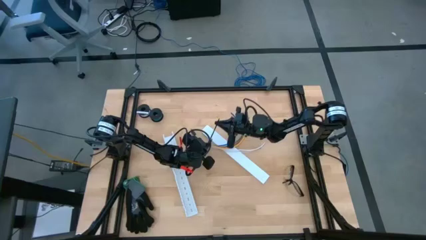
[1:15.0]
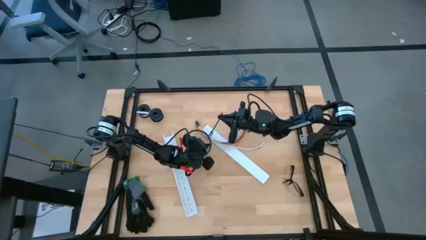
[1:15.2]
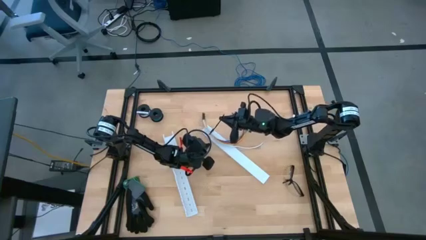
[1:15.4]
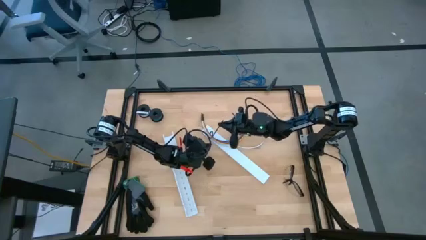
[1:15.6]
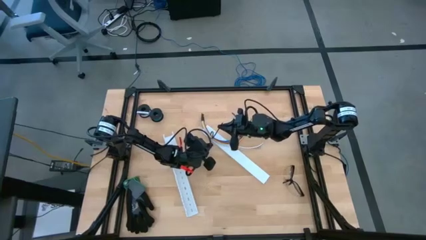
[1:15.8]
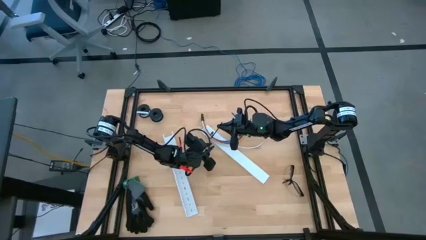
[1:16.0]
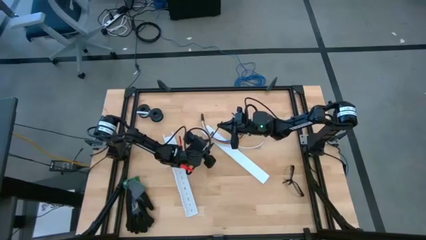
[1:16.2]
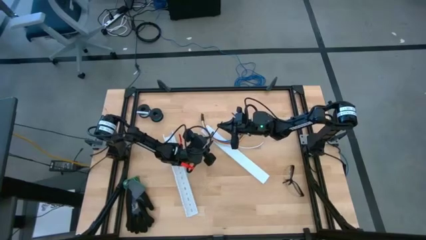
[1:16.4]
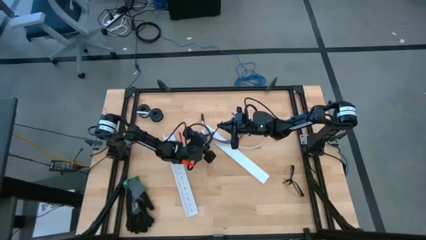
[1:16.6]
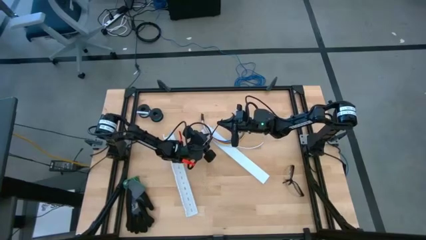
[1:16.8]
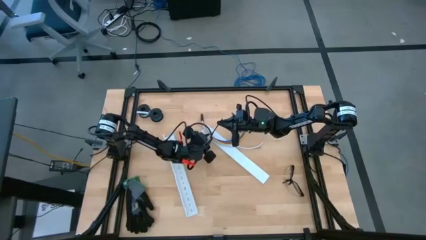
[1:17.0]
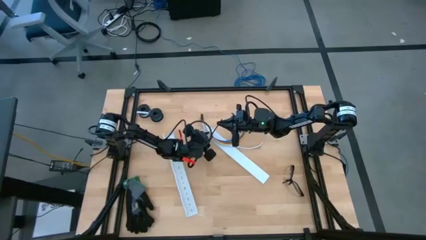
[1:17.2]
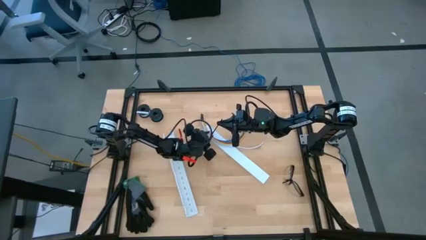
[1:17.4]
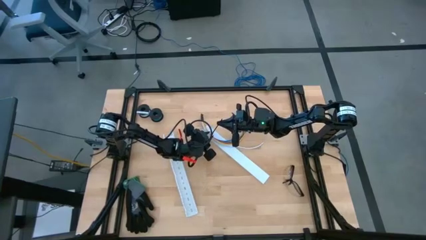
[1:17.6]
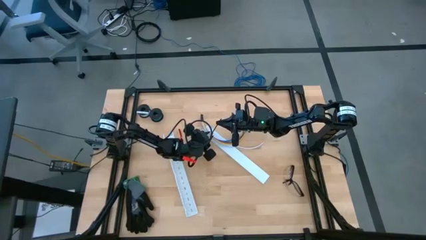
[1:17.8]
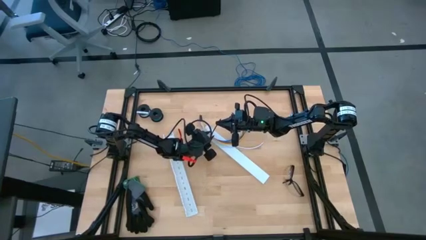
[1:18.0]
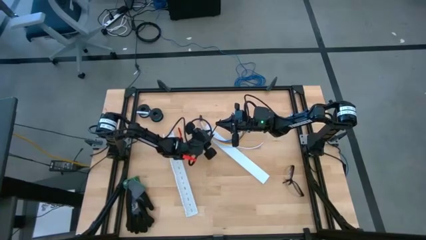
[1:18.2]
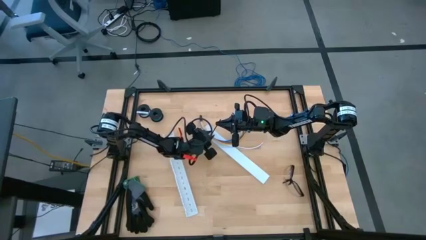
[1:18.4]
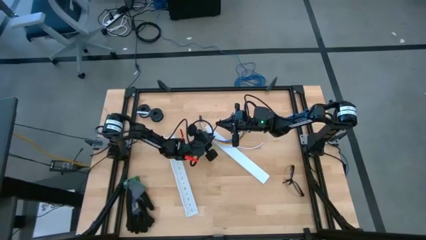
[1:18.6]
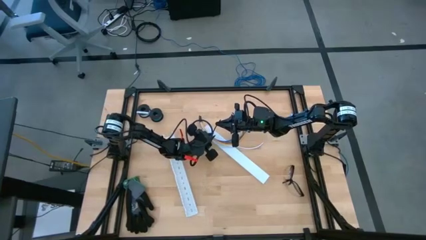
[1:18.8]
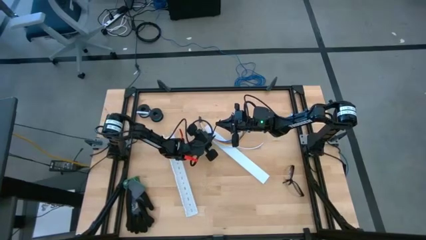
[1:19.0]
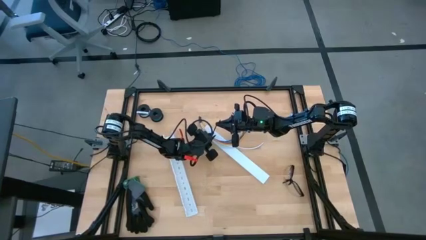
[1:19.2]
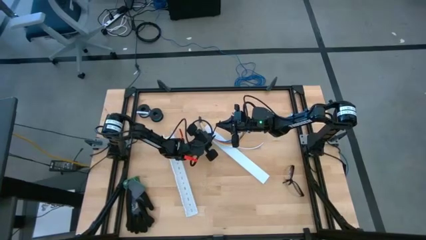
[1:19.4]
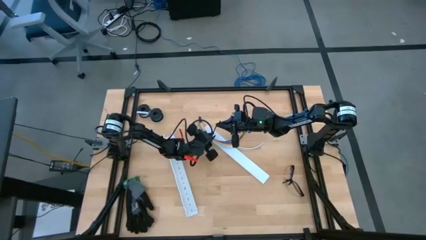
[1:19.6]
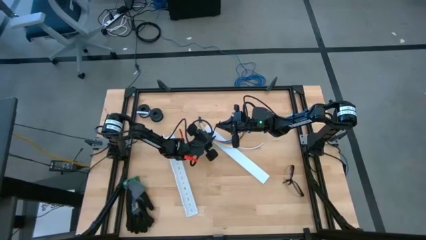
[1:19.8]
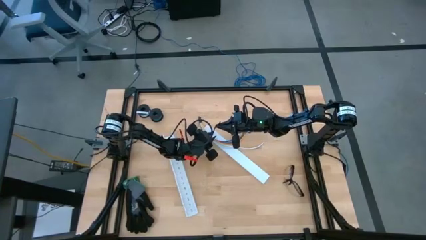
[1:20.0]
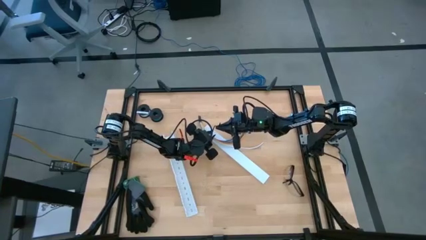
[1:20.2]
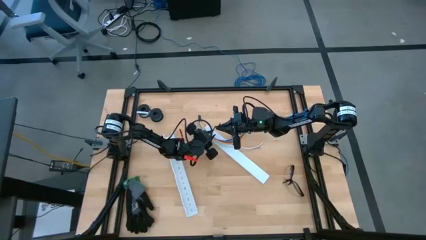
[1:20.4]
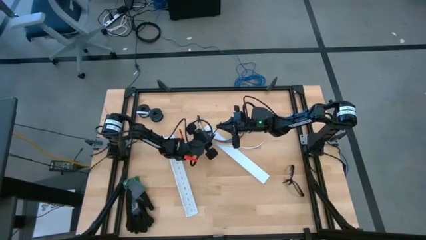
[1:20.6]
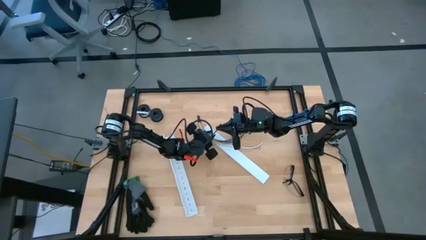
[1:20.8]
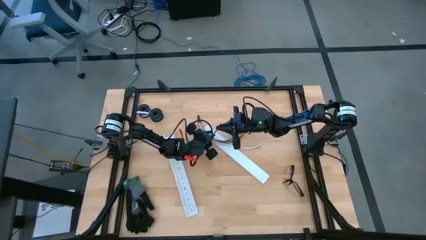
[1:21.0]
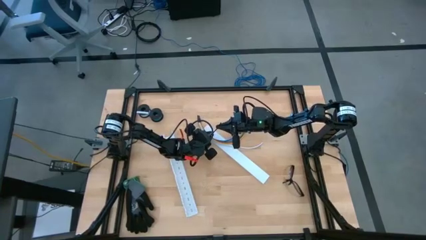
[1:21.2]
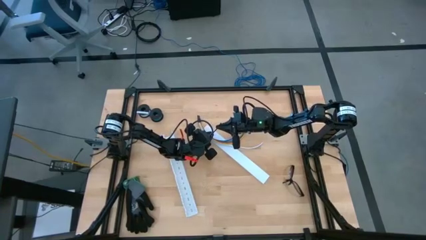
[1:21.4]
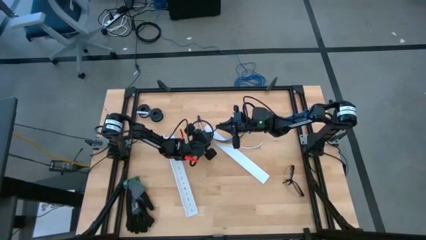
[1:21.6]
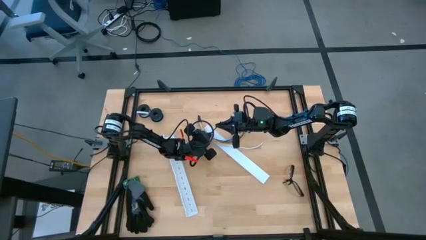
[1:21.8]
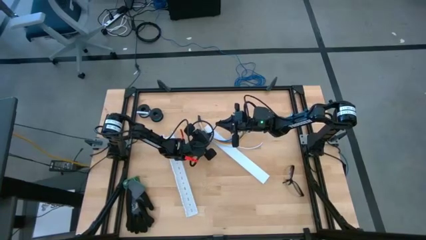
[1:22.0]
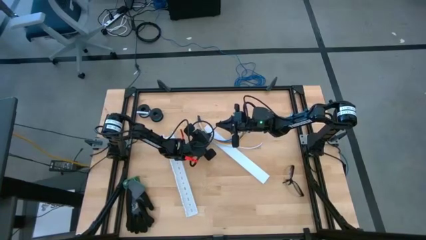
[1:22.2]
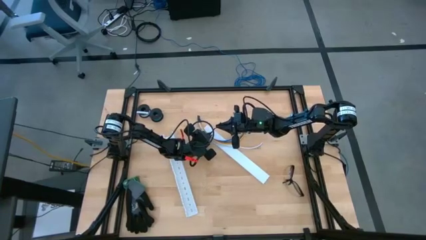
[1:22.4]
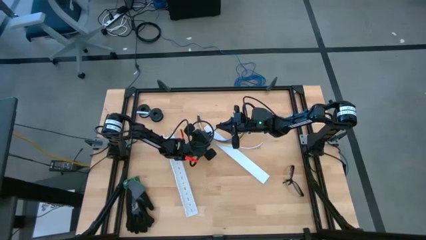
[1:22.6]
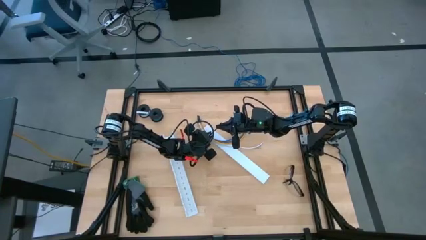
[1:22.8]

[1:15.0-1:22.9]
Task: Ziptie cables
Wrap the cables together using the black zip tie

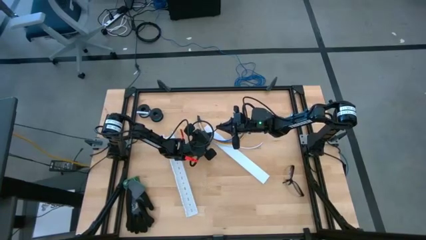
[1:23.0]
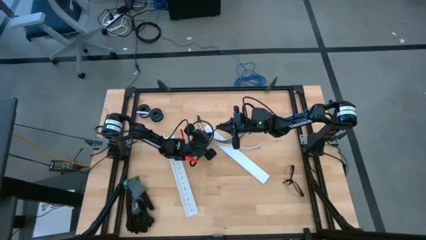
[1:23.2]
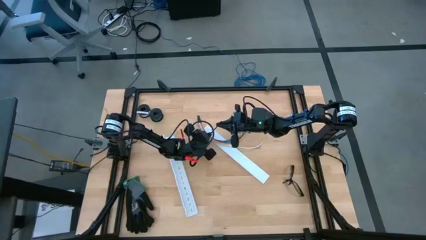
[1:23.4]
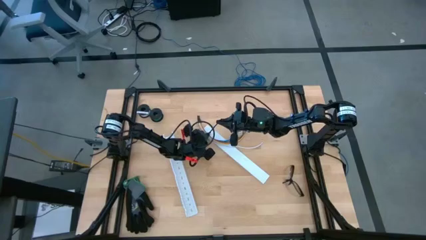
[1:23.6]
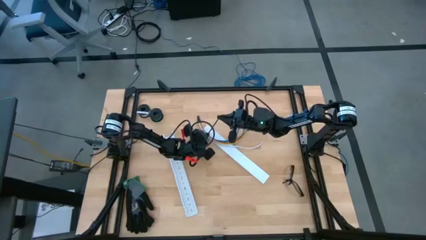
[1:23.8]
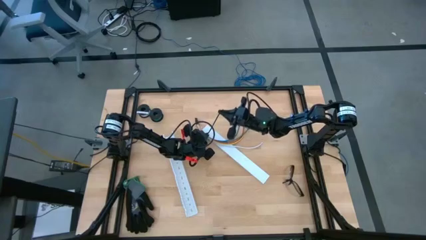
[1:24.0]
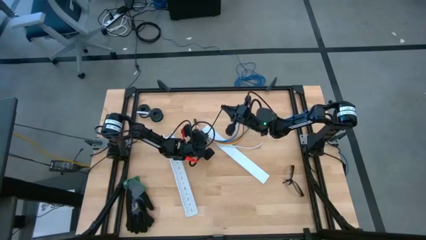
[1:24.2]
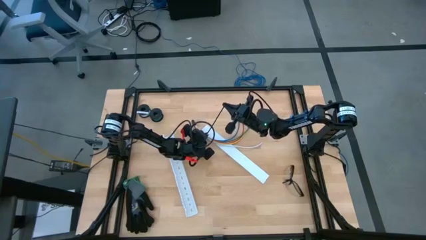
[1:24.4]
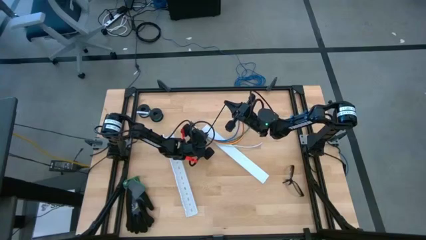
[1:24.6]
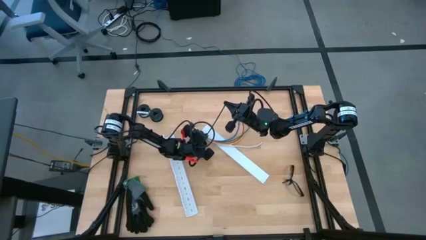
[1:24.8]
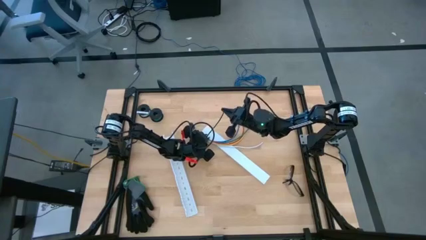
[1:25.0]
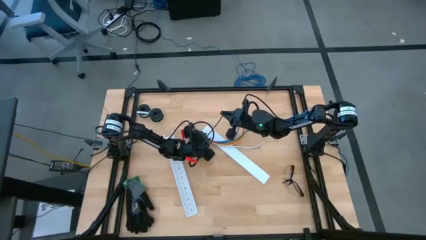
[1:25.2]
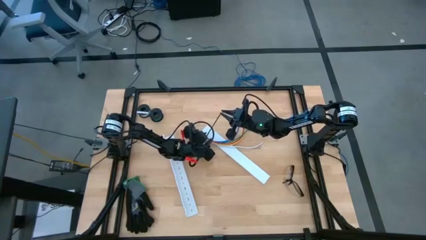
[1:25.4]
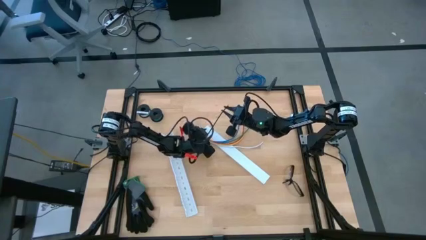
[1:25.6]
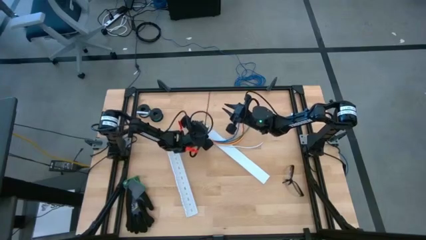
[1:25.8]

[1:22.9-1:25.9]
Wrap the cables together using the black zip tie

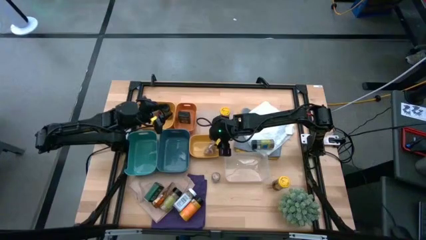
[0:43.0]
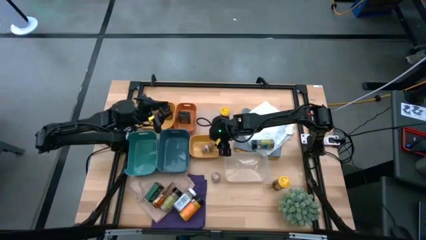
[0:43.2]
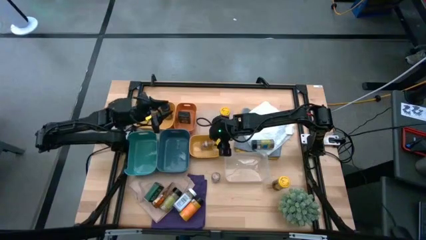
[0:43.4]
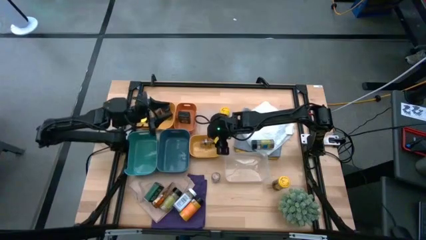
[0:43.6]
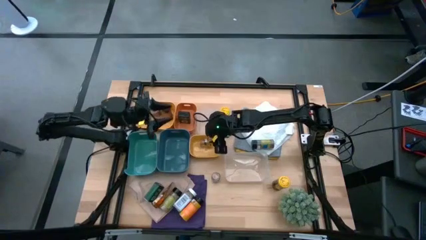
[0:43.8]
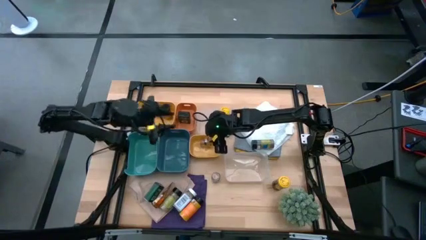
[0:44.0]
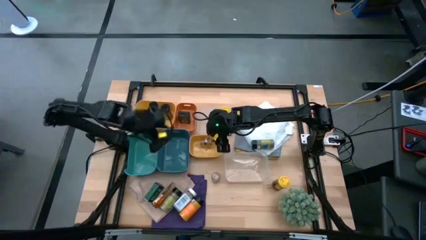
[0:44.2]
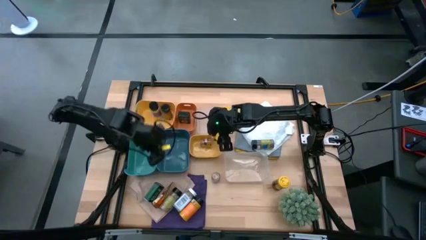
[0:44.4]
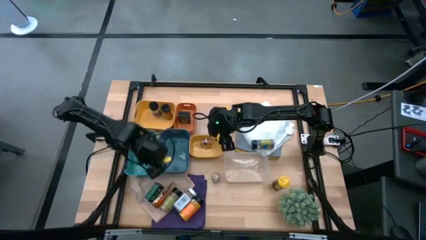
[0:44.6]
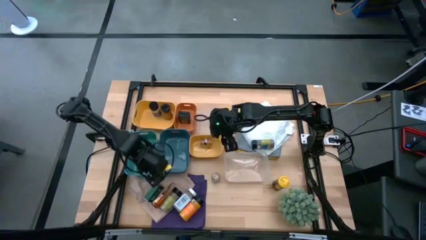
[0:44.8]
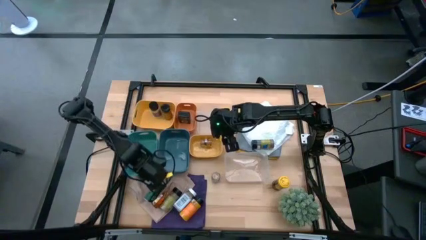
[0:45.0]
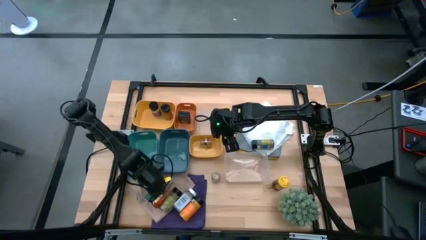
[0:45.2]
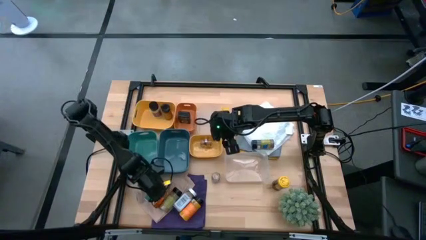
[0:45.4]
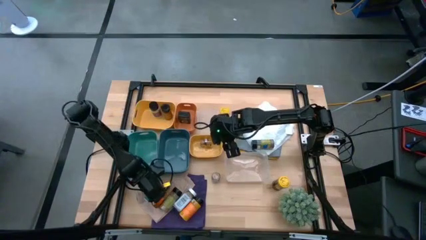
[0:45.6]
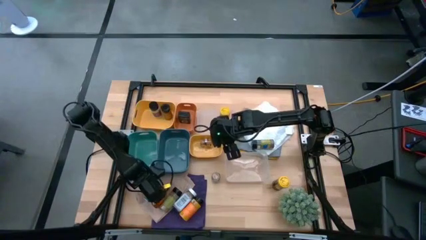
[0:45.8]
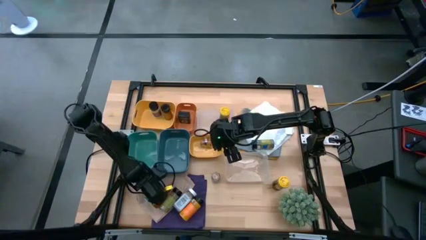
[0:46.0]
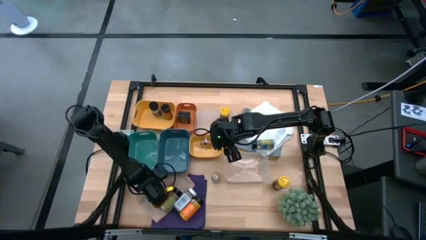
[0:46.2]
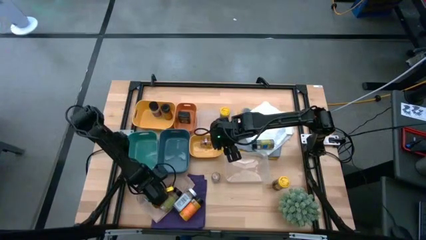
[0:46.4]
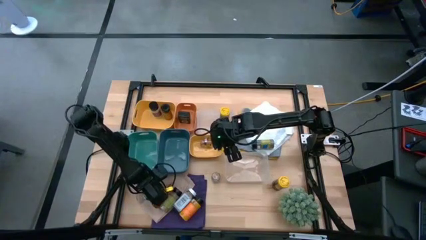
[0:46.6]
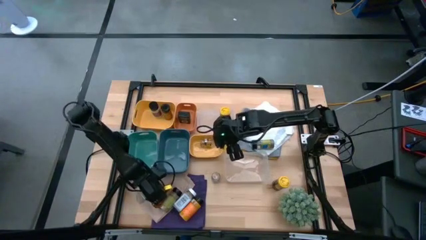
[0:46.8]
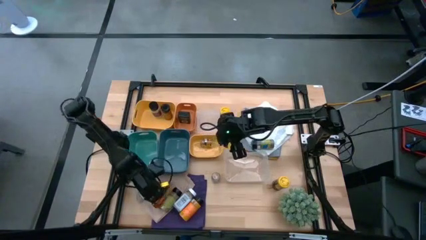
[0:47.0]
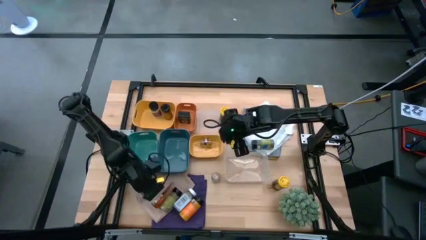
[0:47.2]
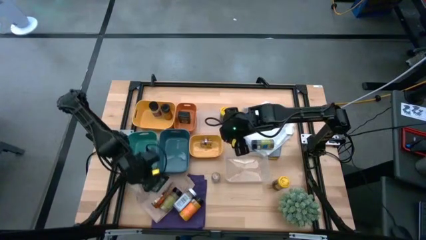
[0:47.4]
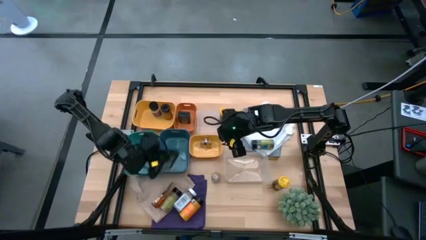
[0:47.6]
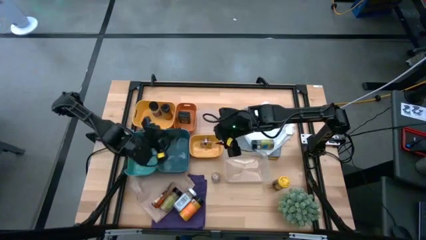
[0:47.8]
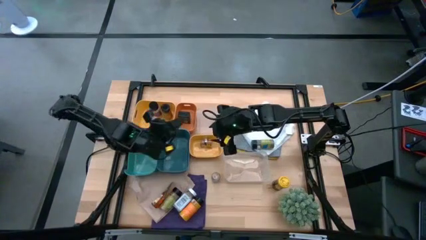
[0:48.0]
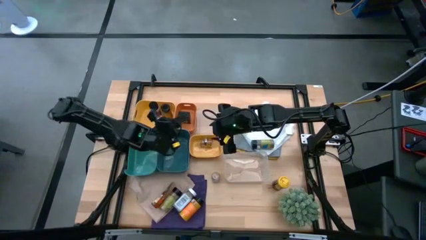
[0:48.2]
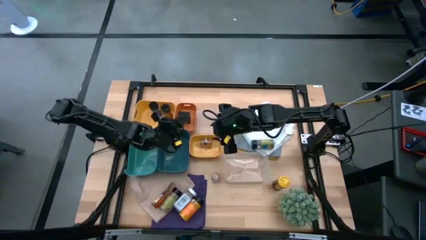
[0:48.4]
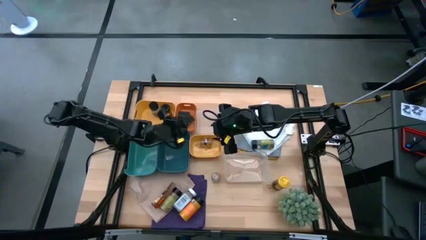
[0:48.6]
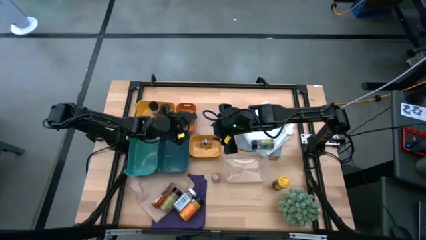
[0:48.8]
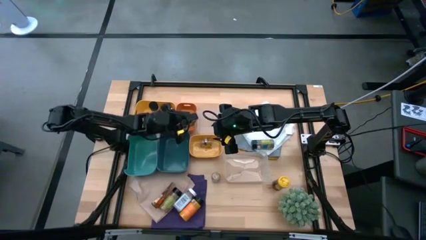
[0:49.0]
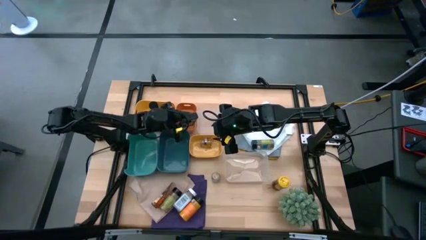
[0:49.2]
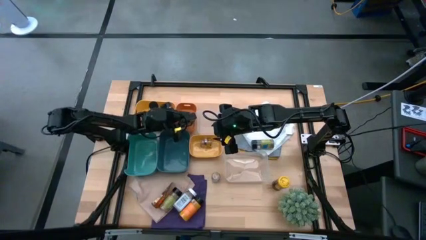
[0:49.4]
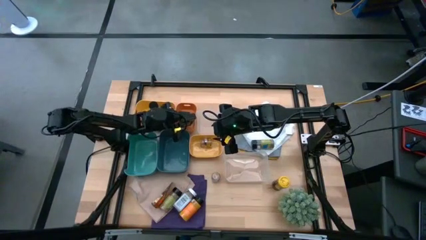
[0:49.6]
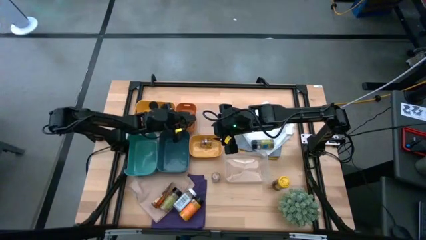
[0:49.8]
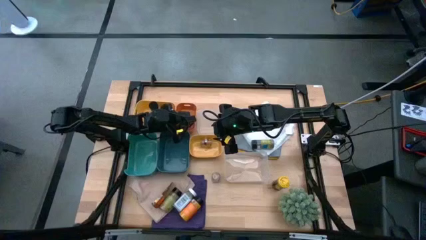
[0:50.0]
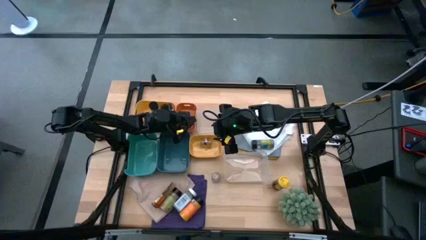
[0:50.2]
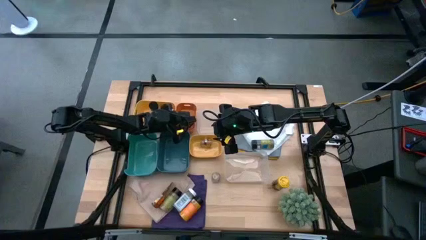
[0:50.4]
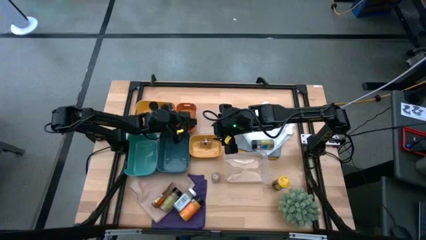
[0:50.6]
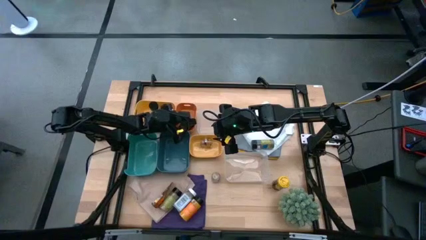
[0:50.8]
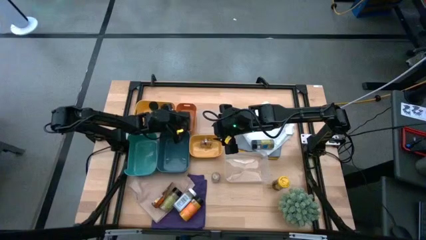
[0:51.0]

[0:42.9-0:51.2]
Task: Sort spices by type
Put the green spice can into the orange bin
